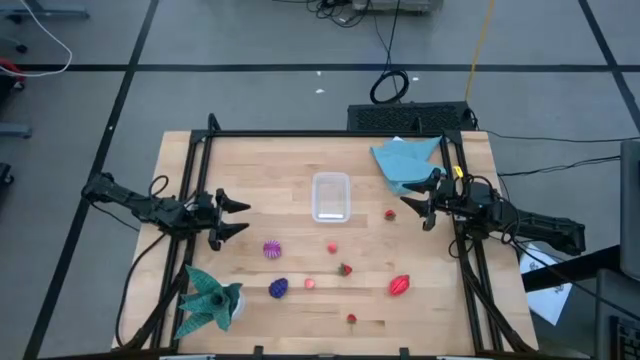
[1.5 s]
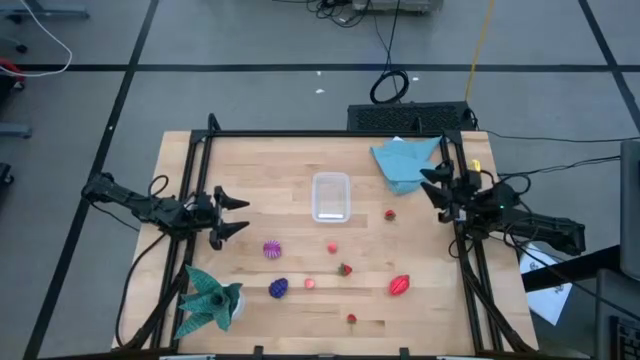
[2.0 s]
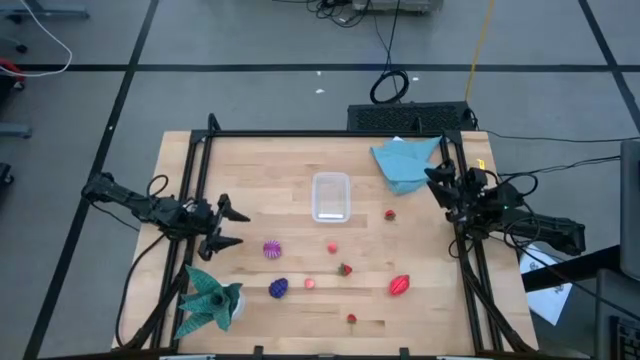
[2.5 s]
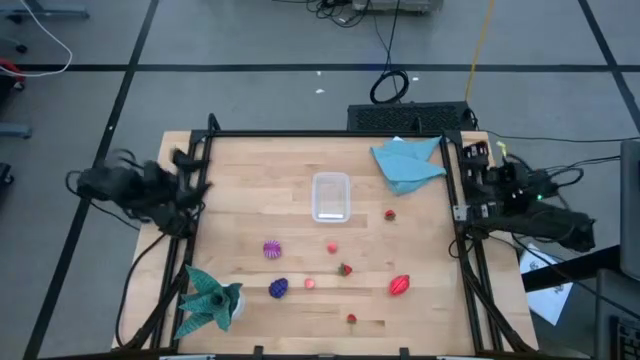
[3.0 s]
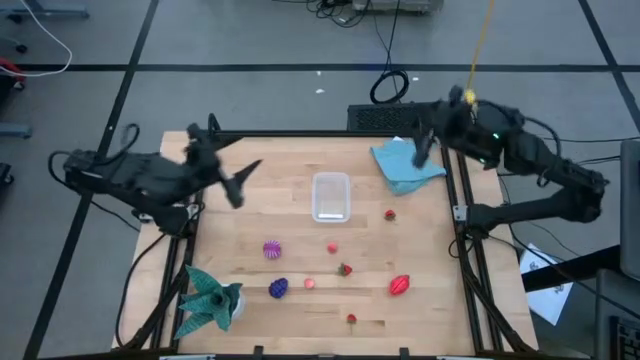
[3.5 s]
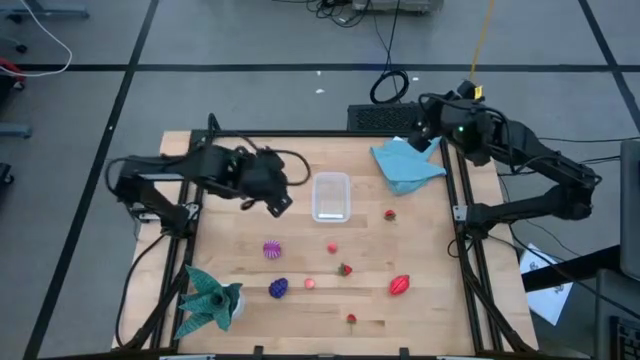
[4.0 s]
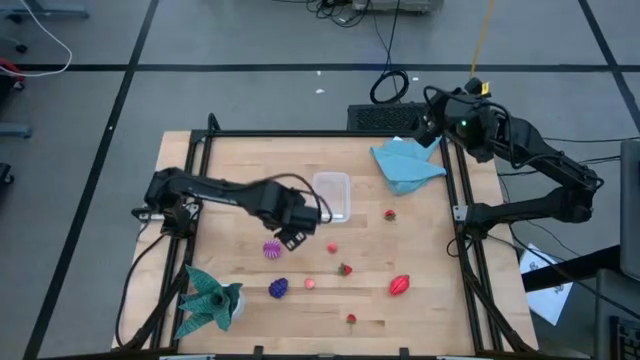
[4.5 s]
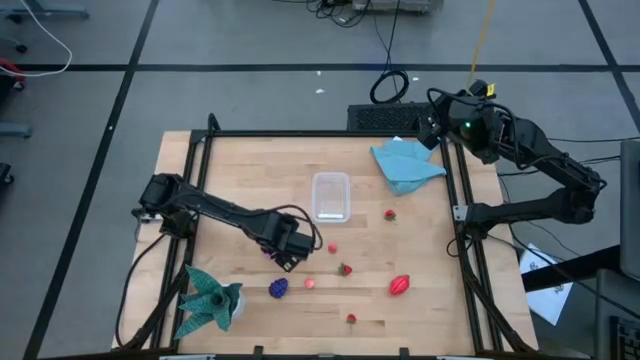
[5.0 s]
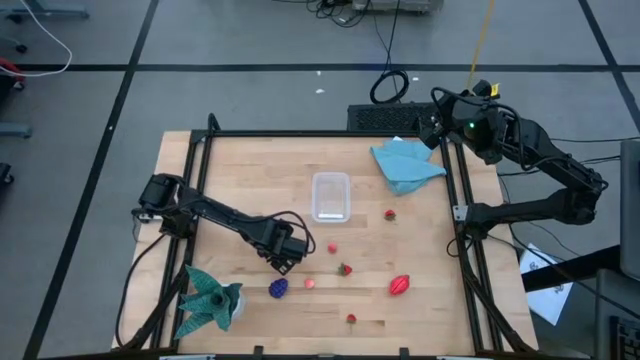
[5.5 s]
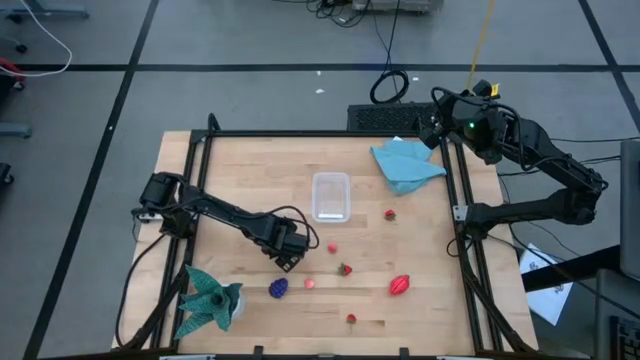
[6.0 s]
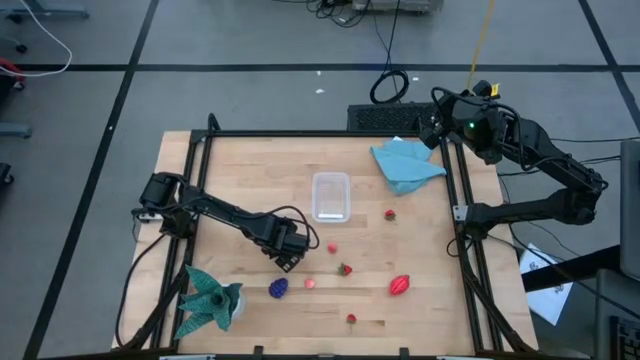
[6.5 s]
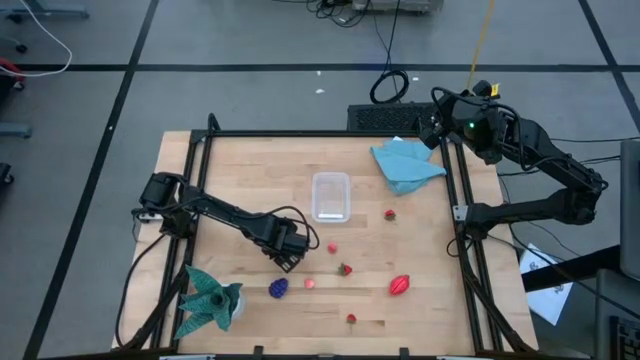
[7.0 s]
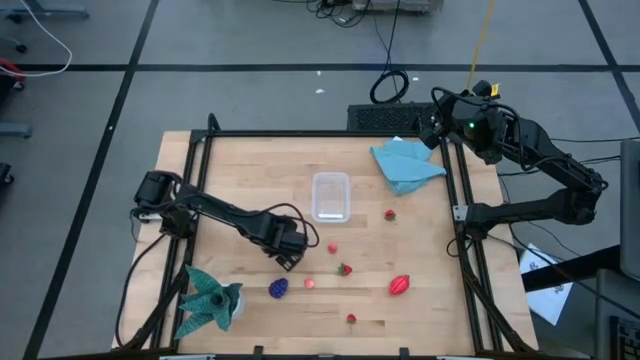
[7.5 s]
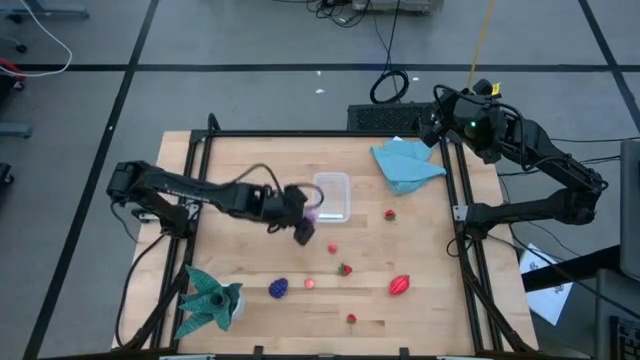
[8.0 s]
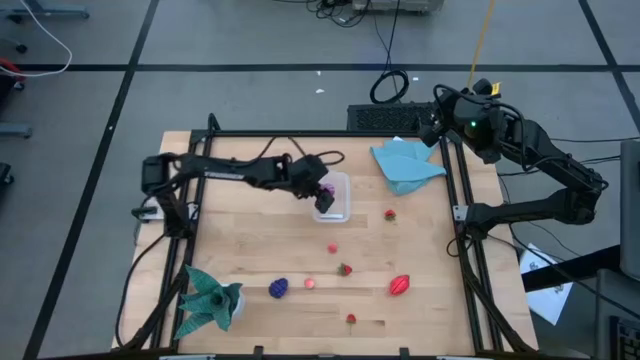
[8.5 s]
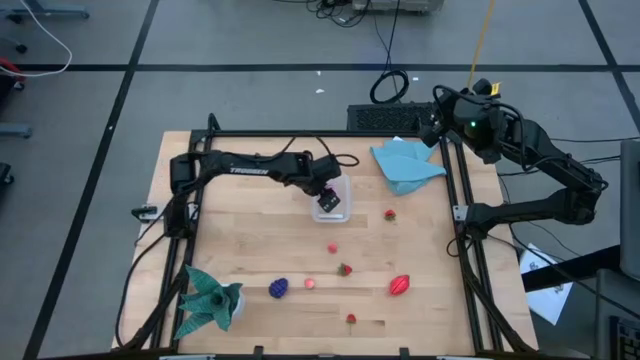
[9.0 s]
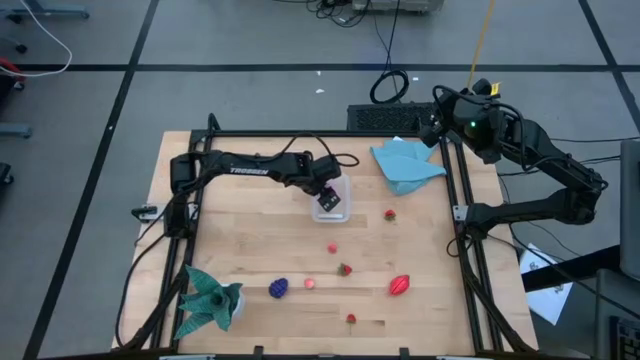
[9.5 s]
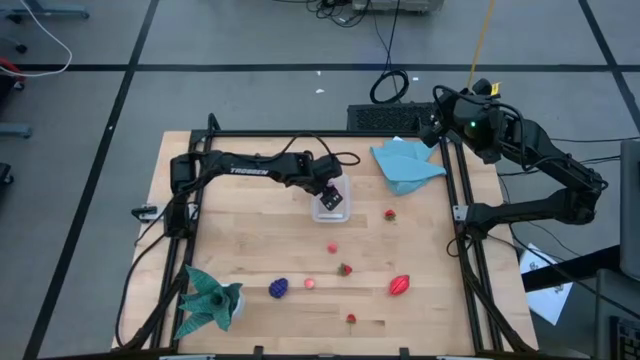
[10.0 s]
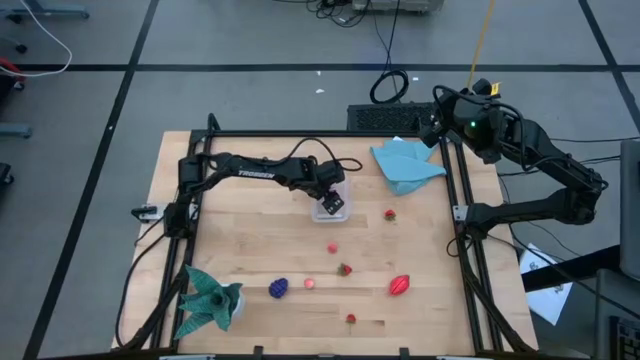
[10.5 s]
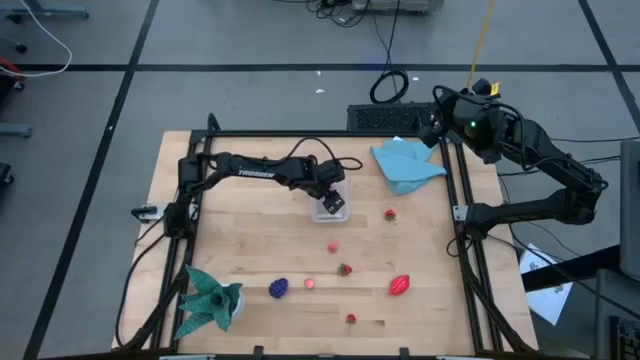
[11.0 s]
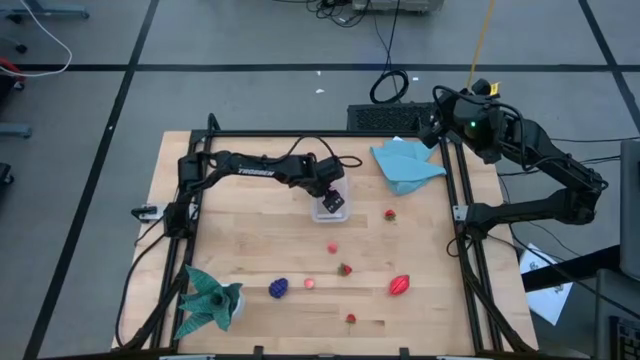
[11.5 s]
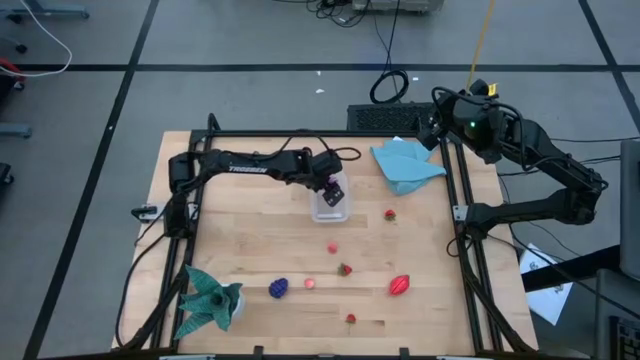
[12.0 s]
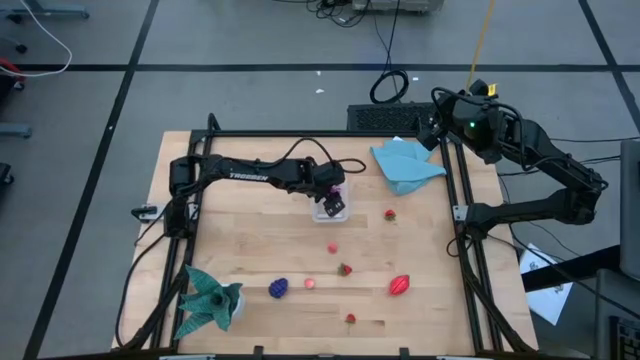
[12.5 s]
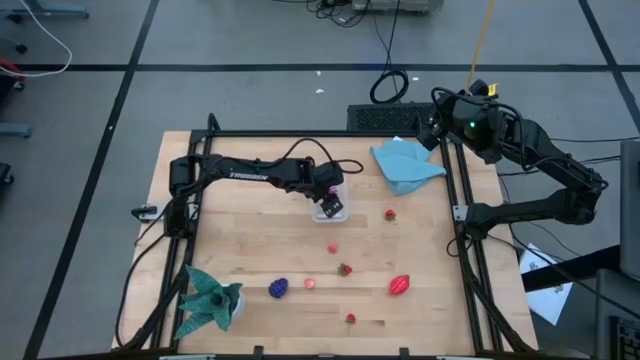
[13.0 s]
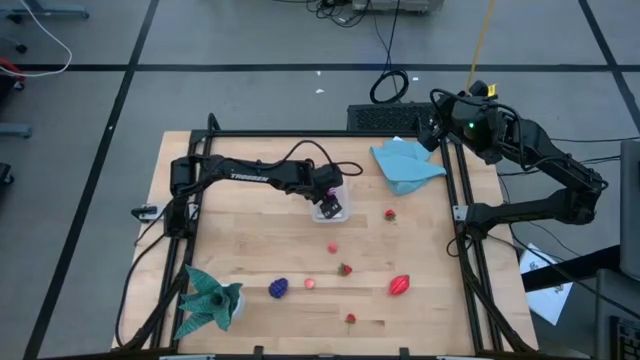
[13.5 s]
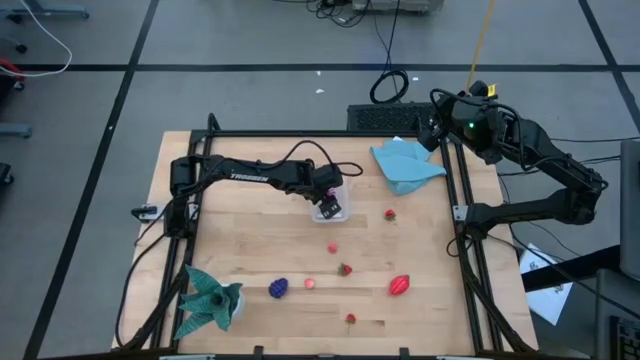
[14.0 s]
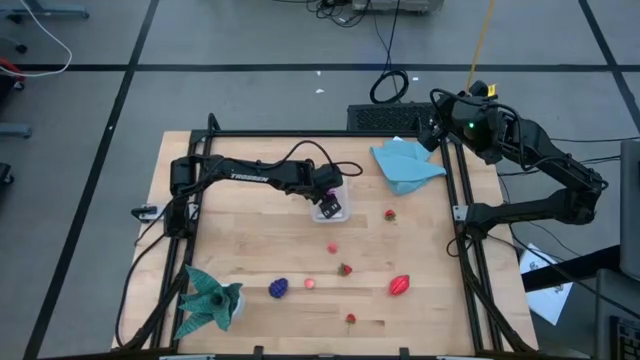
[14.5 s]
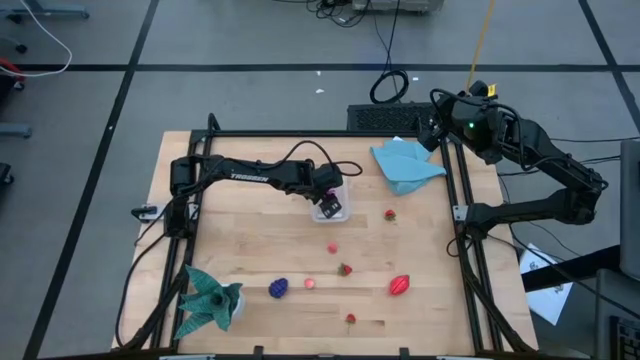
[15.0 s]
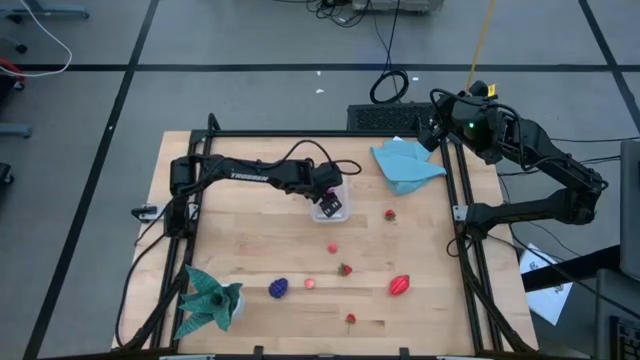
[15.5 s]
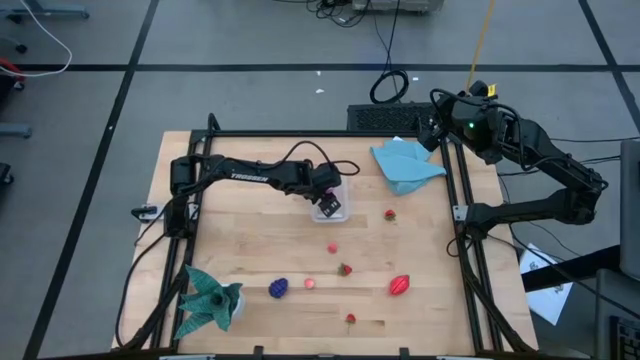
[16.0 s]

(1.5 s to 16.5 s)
Task: Pick and placing Produce into tupperware
Put the purple onion into the transparent bin
